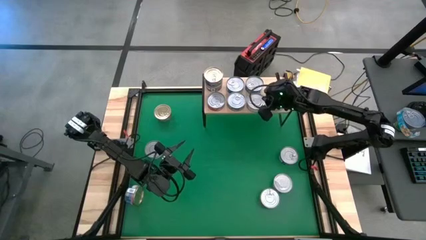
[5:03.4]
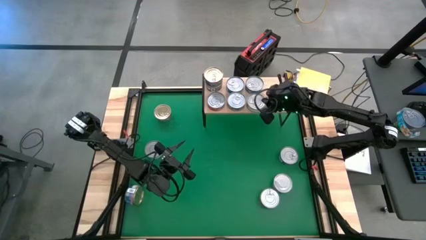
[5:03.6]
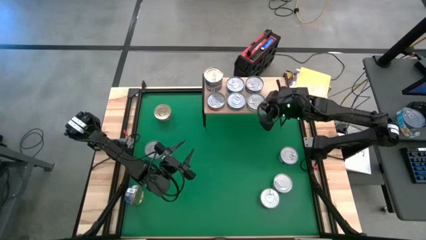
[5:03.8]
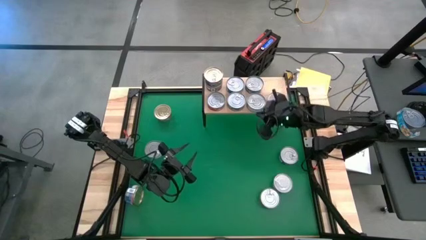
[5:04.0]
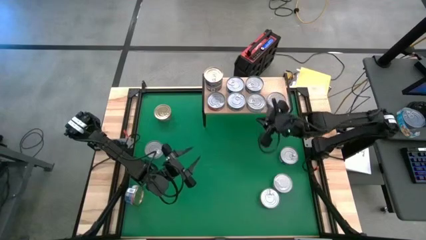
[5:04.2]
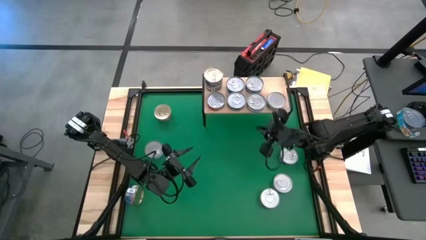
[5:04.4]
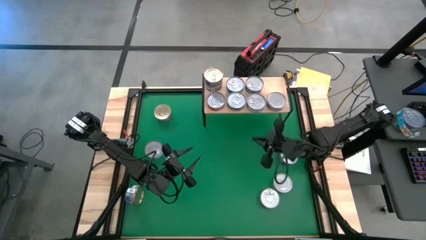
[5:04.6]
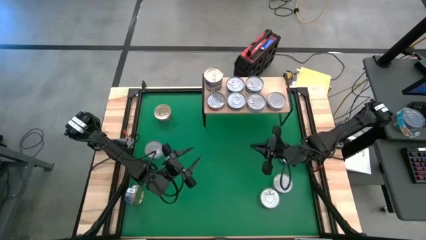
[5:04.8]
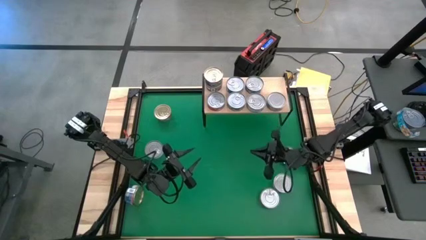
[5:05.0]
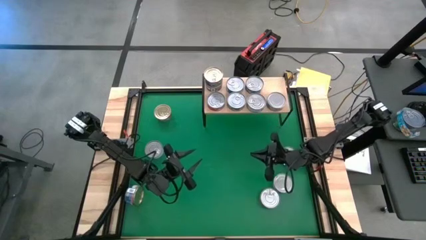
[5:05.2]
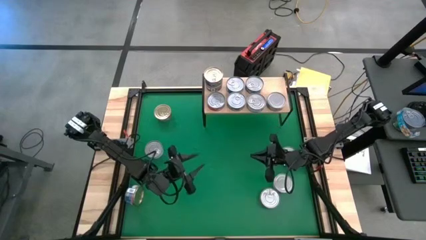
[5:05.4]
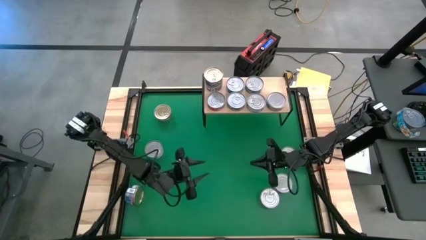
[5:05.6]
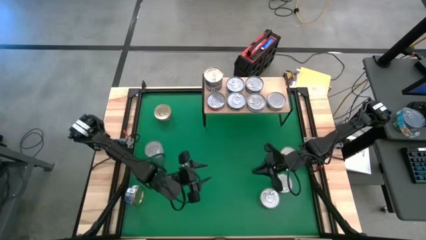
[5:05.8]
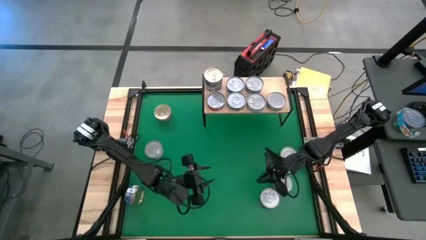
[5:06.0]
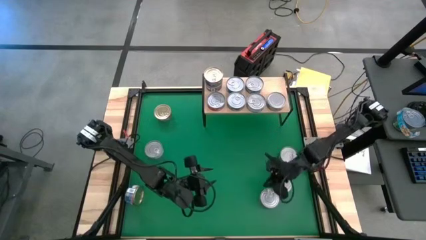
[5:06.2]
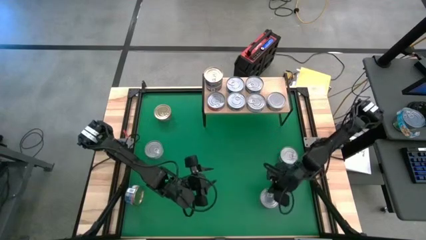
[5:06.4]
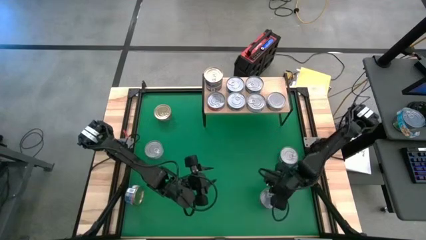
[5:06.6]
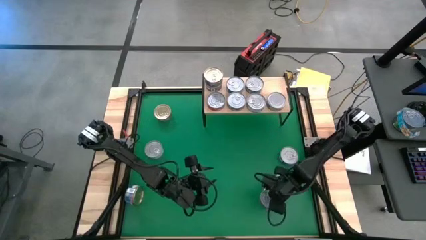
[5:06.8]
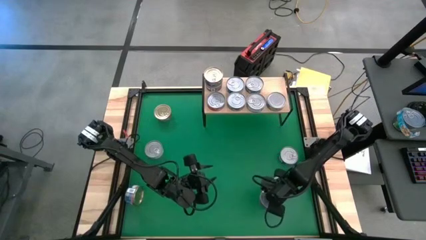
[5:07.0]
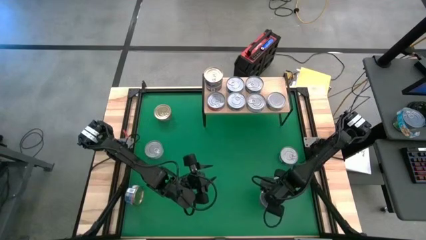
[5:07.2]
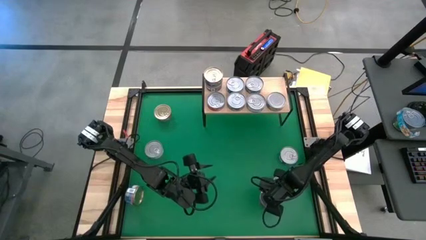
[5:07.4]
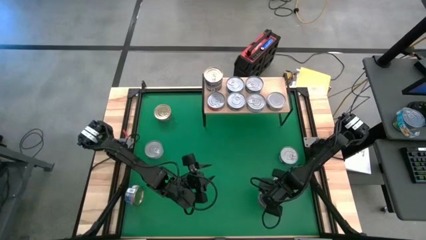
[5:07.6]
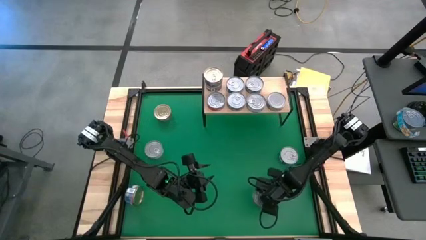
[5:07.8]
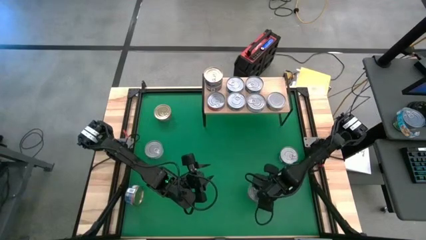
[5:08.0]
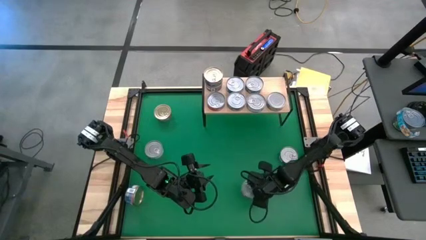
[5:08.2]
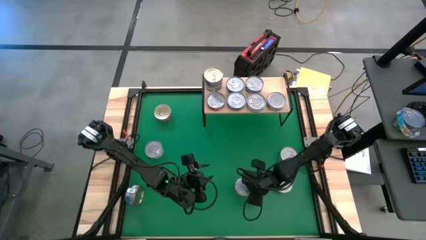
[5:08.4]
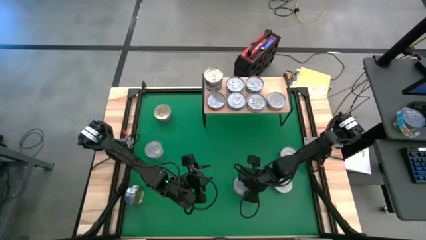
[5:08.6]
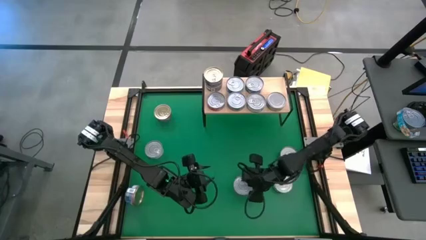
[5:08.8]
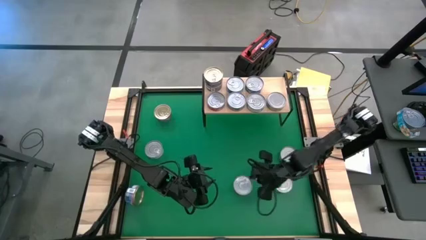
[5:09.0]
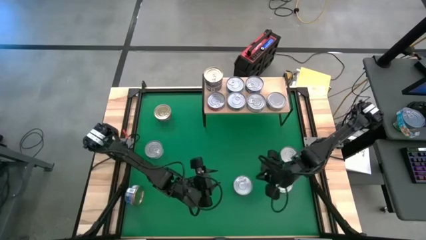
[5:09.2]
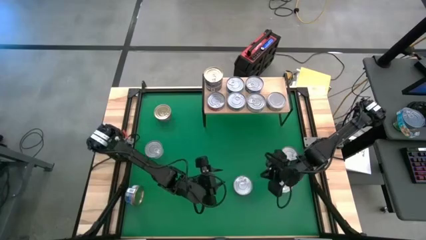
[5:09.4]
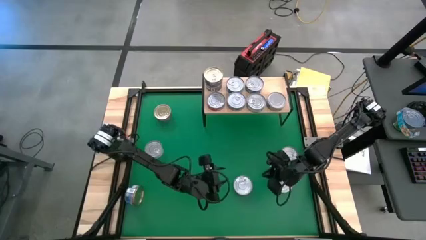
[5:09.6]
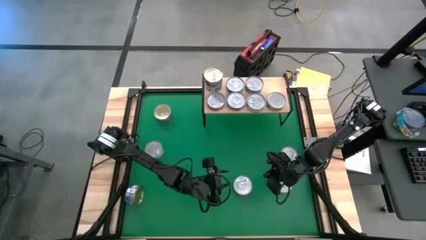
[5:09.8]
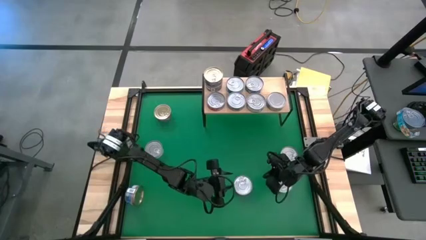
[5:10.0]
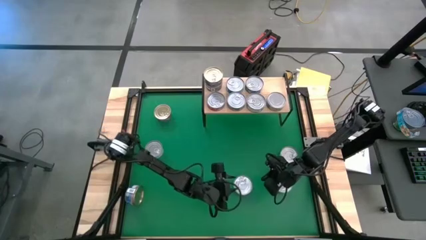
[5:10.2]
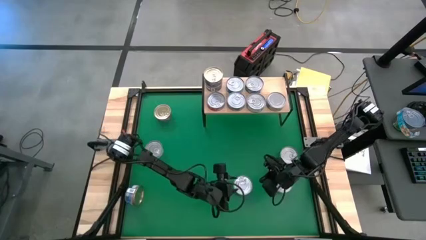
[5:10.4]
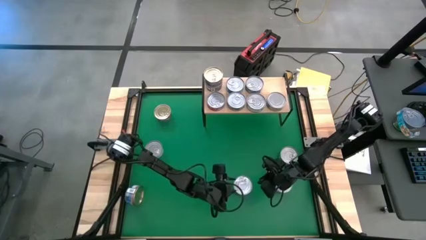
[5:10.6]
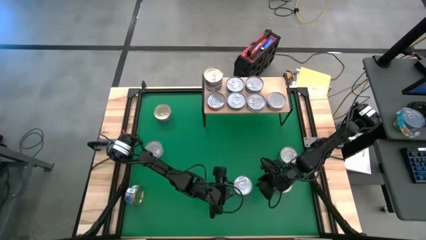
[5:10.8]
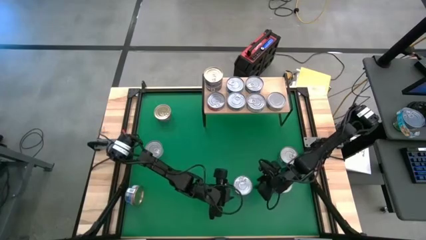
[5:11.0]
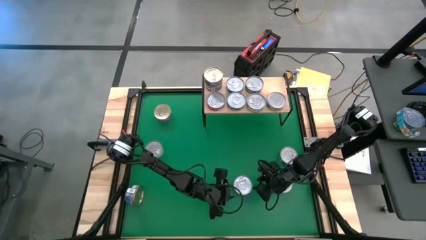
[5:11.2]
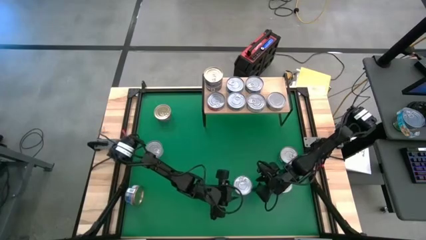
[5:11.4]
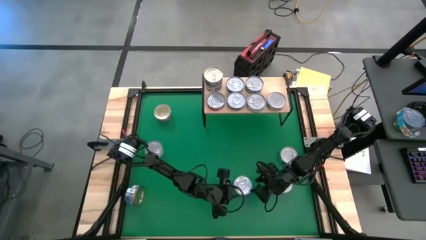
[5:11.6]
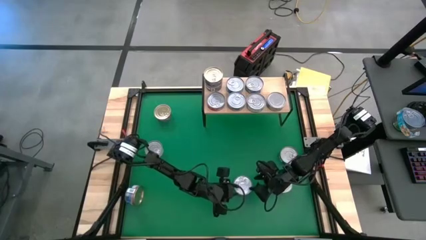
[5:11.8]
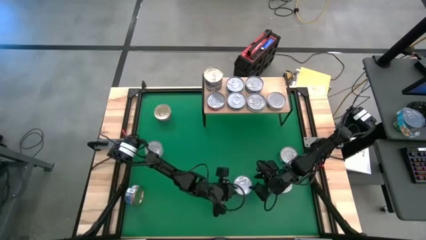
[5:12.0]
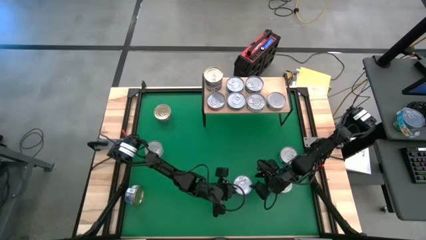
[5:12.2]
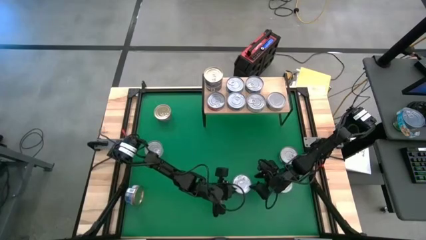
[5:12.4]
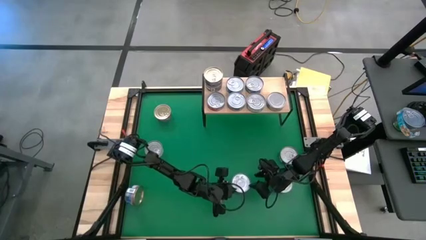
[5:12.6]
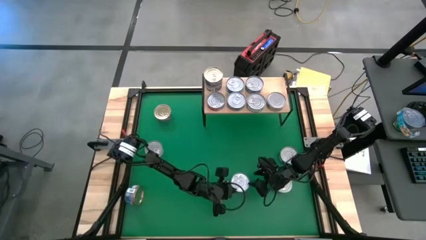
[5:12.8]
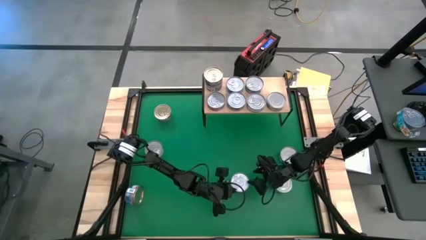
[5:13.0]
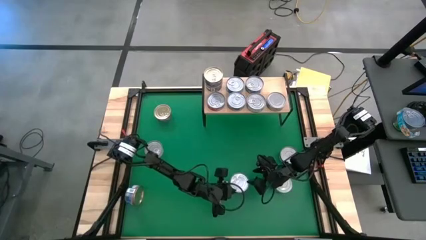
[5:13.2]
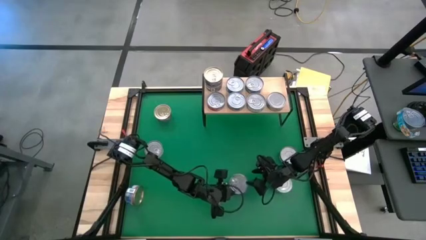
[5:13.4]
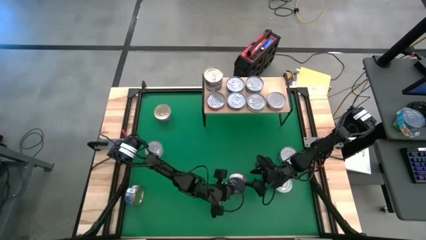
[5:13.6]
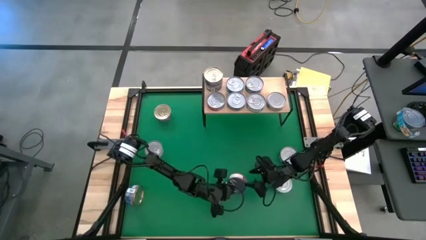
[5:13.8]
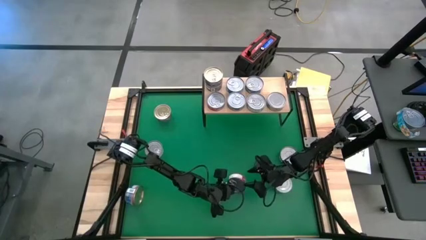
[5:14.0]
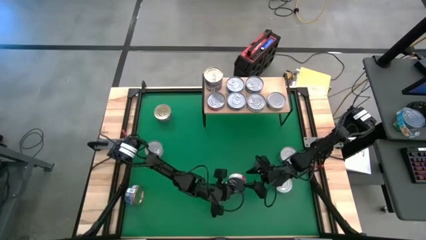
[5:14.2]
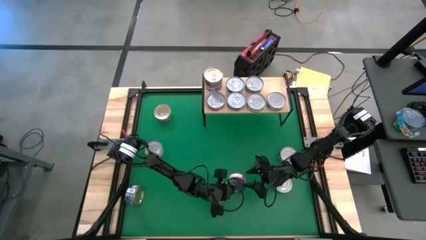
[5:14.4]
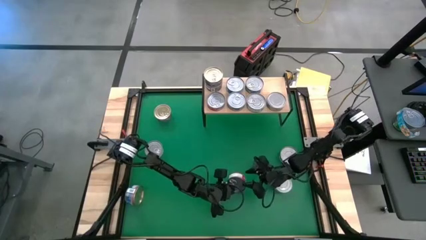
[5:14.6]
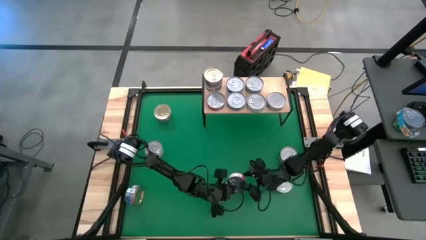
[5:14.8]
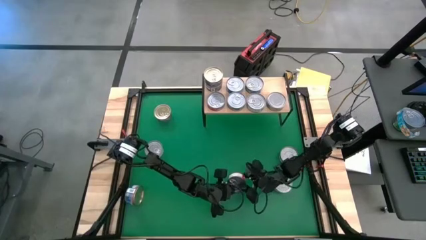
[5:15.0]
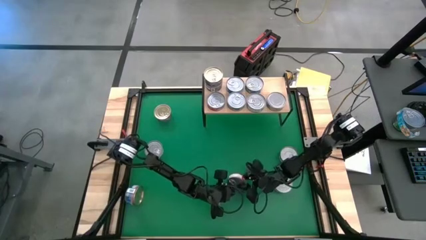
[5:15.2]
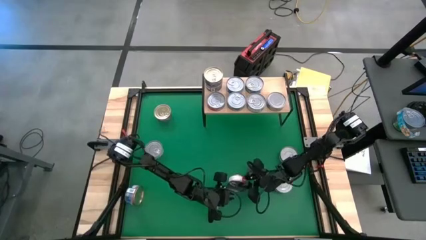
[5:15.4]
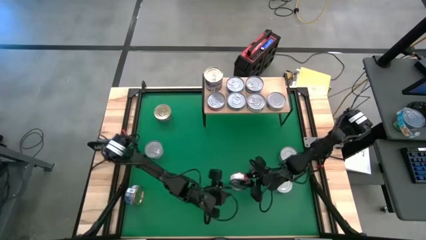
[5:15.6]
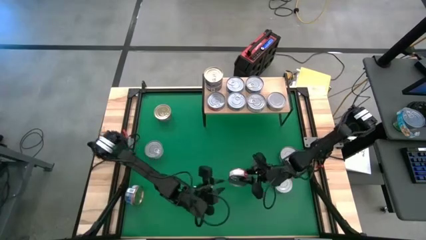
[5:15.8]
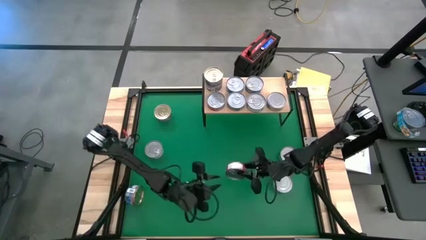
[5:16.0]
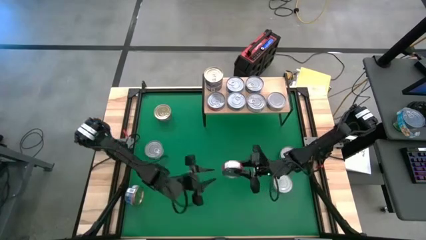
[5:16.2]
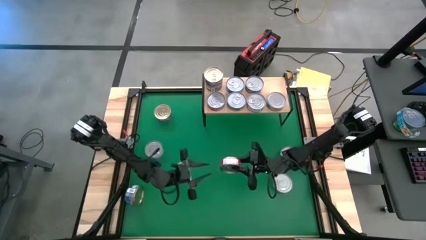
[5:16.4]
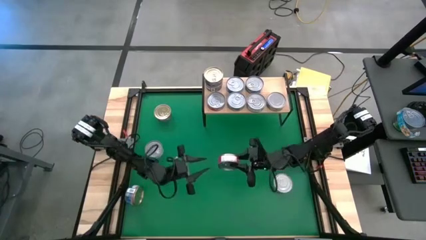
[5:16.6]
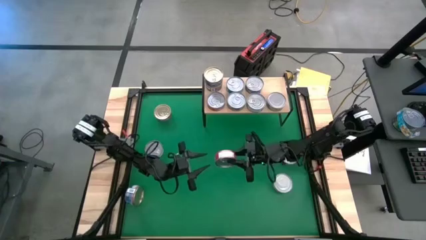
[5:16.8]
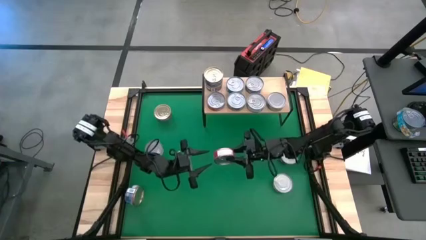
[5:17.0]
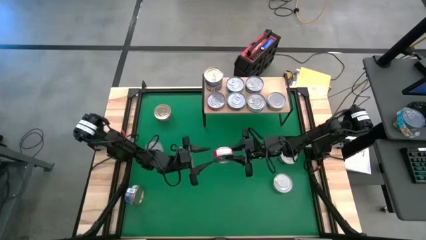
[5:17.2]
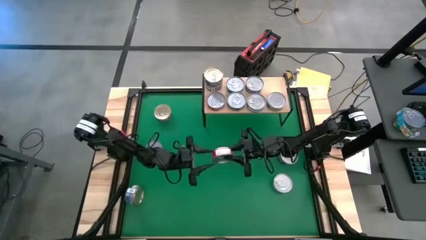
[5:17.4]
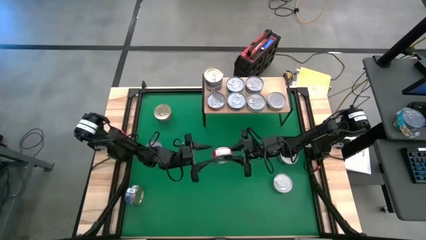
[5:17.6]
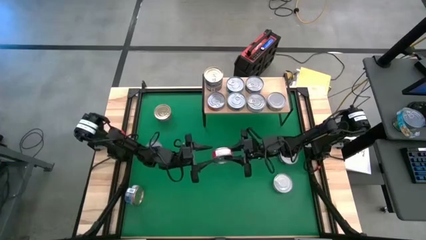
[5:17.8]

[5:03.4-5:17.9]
Task: Stack canned seafood by type on shelf
Stack the red tuna can on top of the other red tuna can on the shelf
